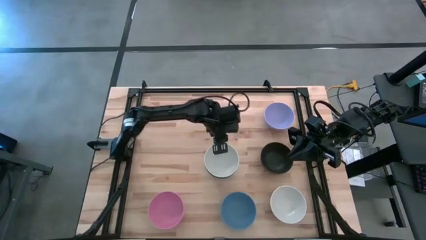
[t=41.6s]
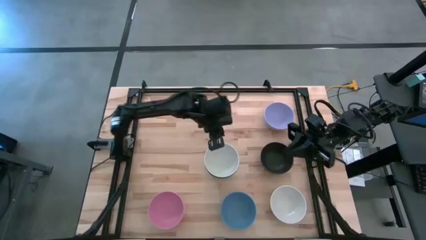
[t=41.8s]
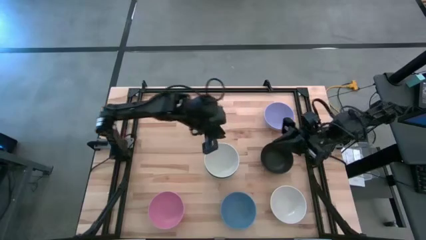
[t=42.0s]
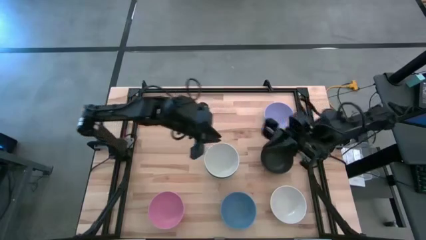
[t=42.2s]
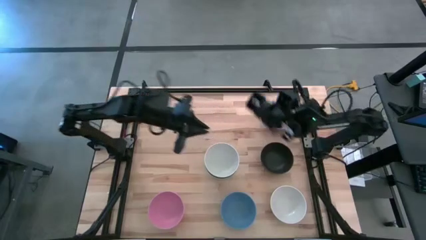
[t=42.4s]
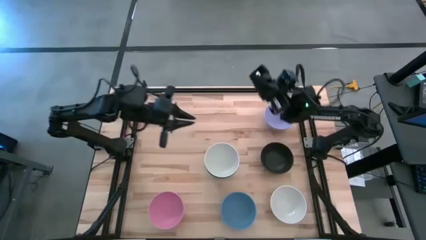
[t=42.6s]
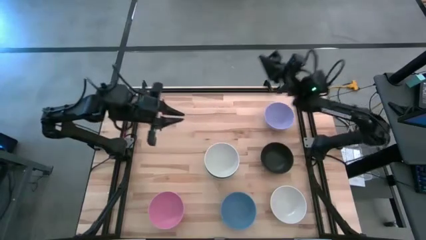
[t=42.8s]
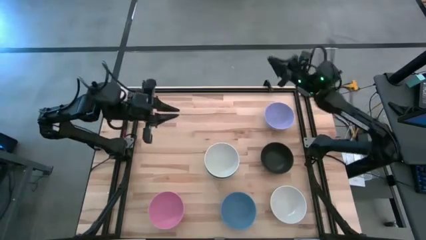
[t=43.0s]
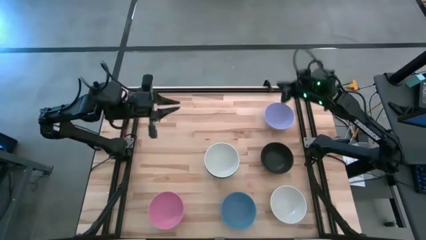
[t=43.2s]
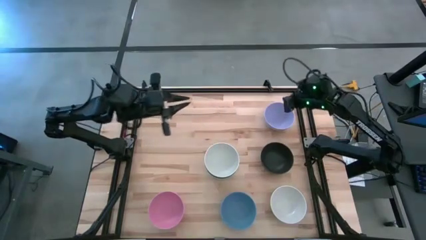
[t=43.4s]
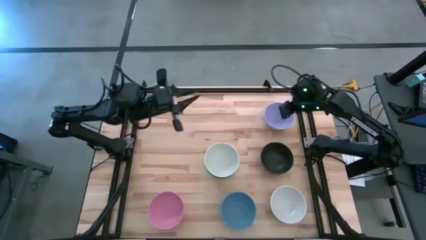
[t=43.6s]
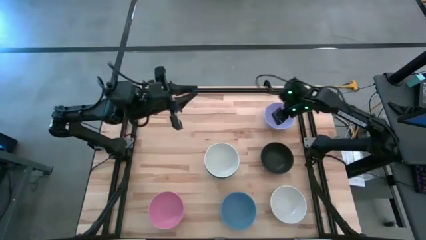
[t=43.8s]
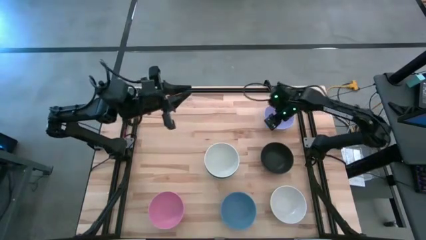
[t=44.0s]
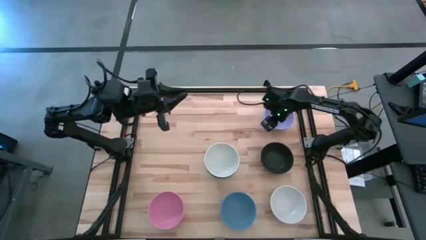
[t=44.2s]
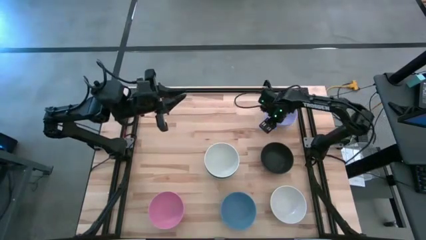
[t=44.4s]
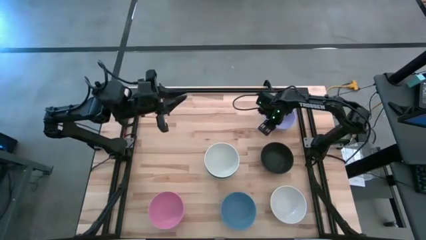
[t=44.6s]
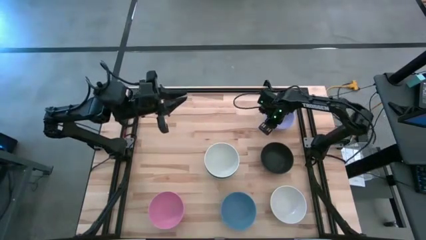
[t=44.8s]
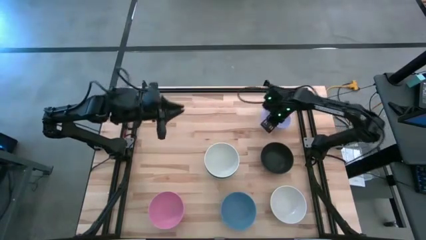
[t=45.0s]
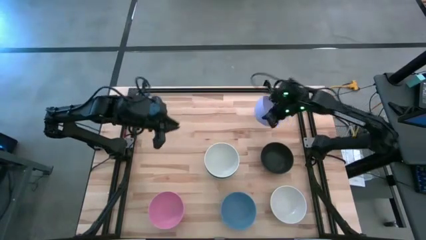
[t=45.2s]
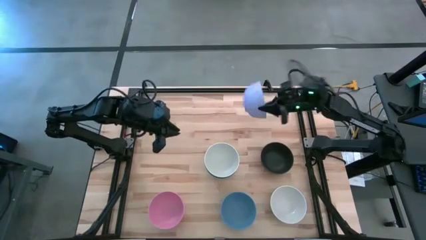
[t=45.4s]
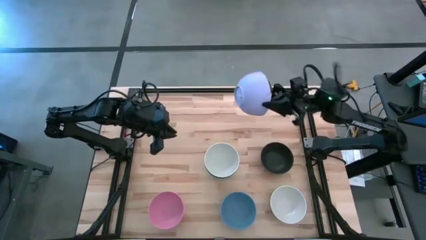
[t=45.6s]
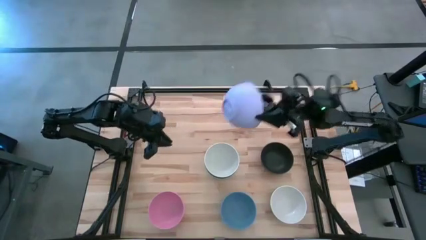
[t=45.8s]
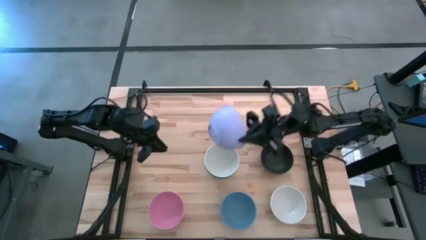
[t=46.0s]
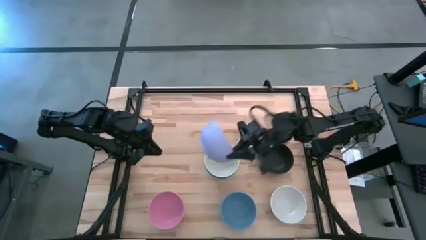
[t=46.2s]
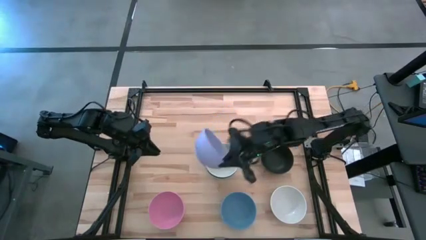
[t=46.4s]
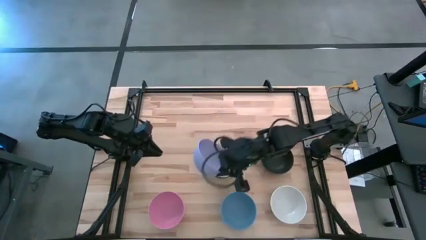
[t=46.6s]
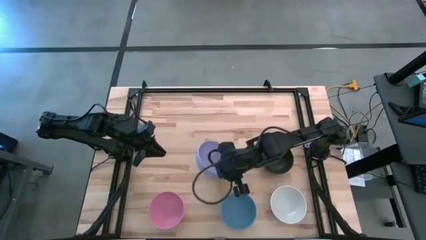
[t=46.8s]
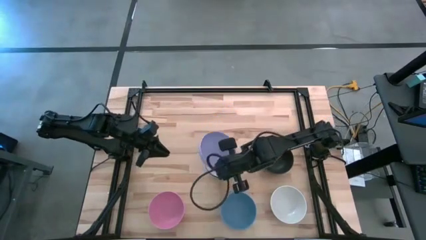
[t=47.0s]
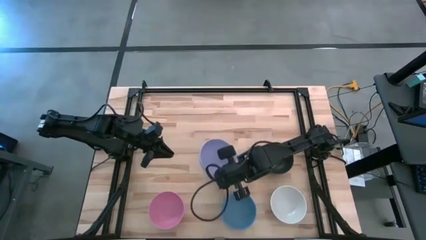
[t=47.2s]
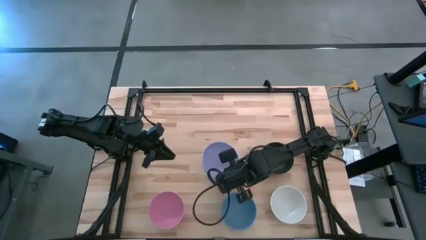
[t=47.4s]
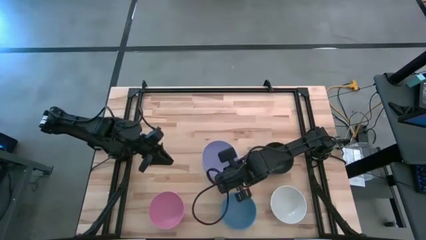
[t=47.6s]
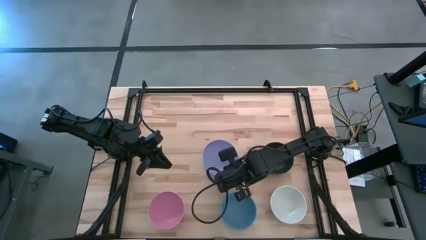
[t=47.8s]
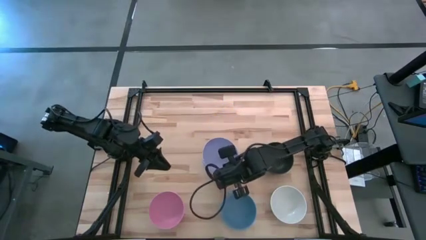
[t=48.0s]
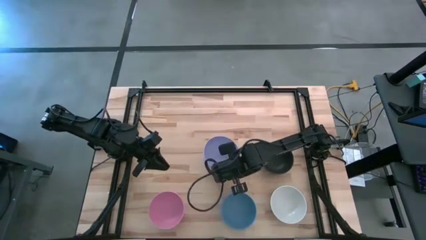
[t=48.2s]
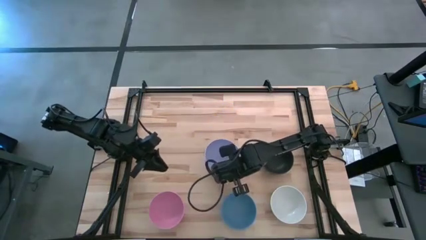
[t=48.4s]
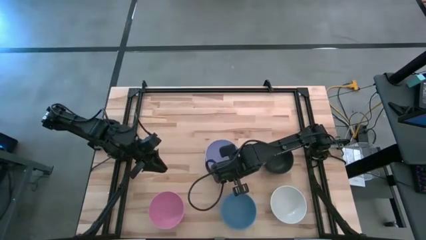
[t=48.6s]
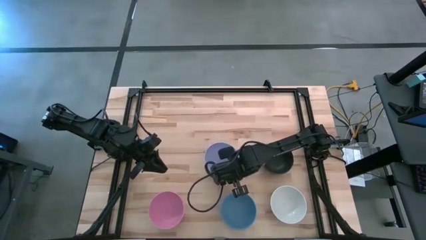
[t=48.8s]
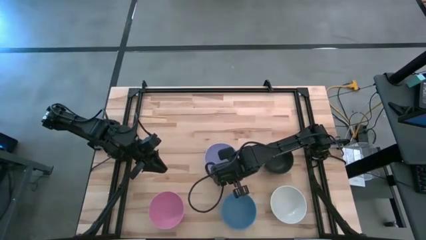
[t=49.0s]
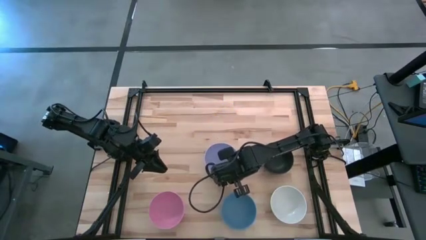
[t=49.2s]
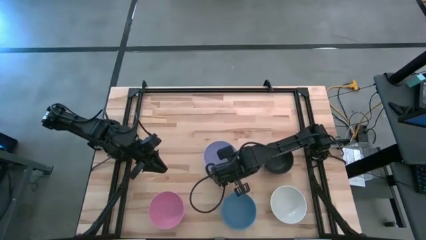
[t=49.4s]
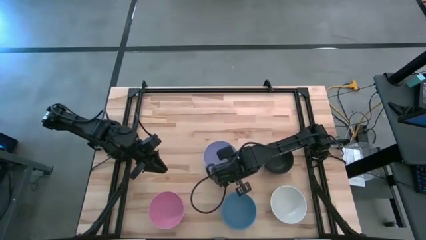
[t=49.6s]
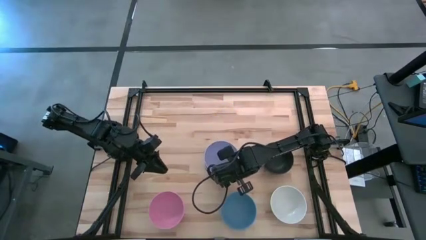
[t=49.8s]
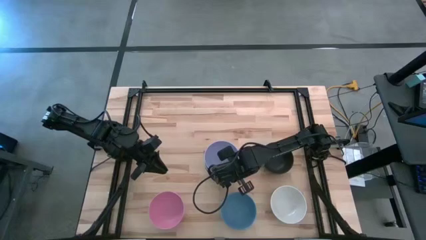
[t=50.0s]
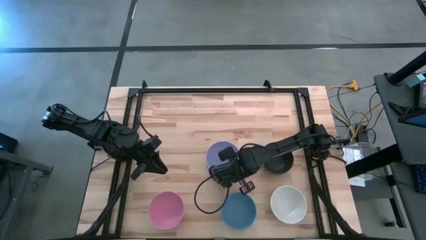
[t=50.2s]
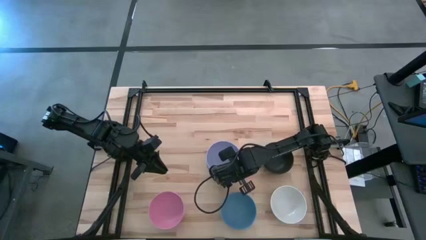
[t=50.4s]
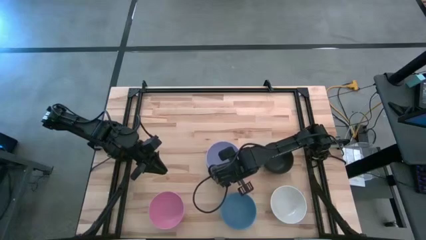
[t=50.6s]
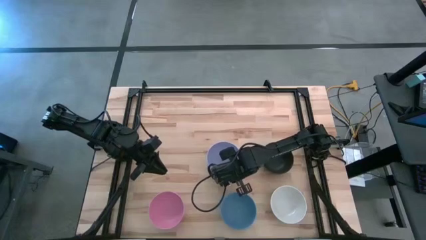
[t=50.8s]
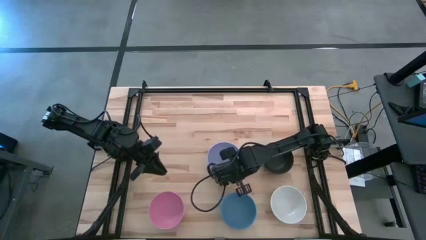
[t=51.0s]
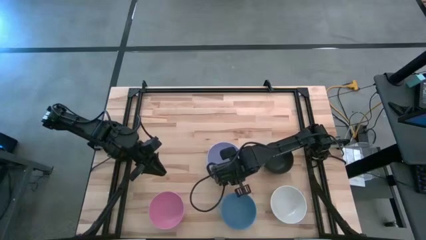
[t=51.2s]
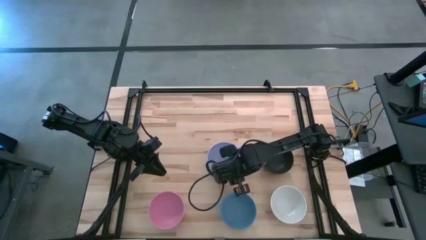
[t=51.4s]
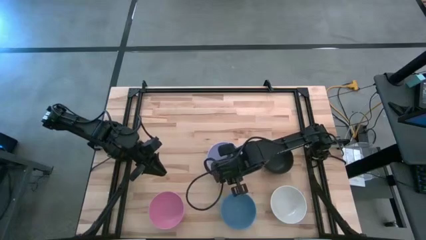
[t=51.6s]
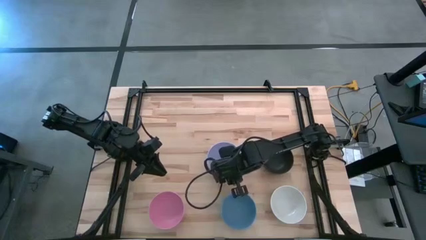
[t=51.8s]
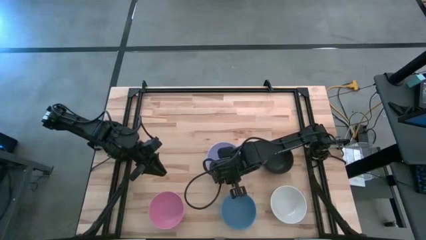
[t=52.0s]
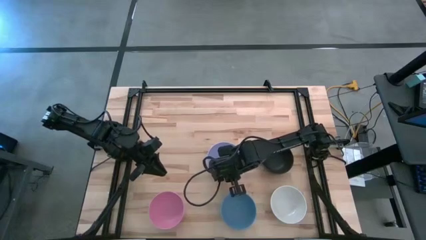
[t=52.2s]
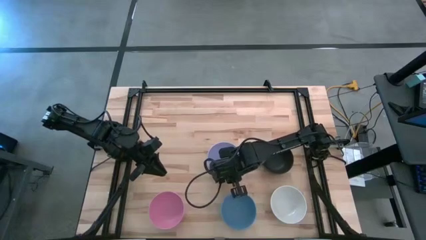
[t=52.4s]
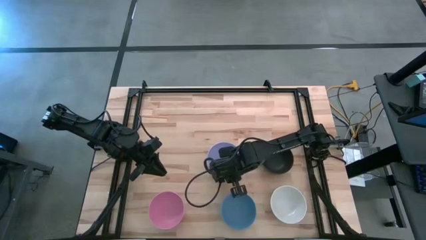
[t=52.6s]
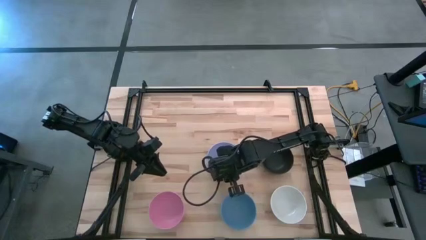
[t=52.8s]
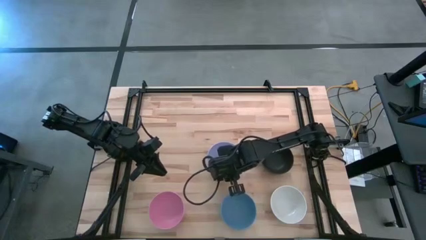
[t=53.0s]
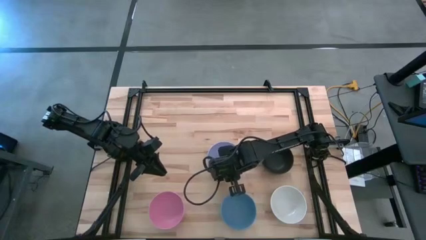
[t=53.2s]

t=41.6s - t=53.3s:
Task: Nest bowls inside each other
Stack the purple bowl on the top white bowl
